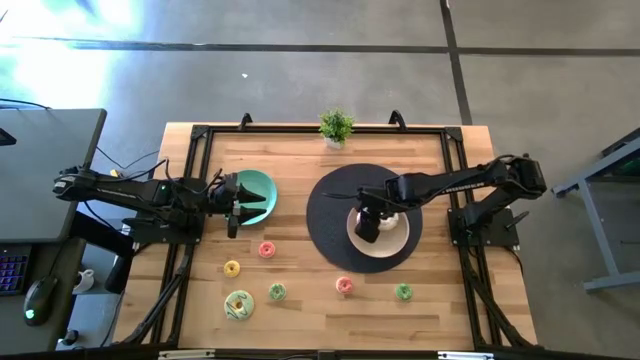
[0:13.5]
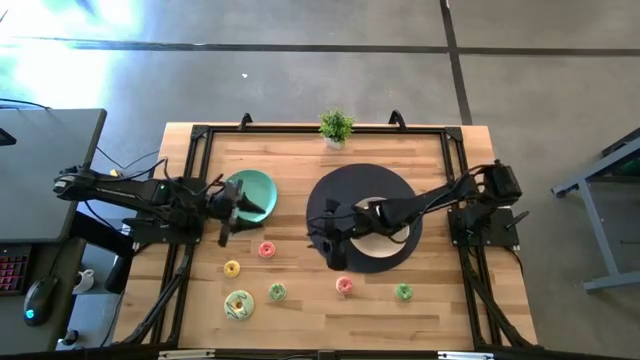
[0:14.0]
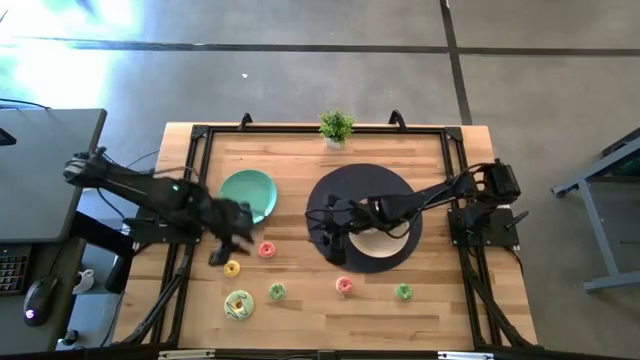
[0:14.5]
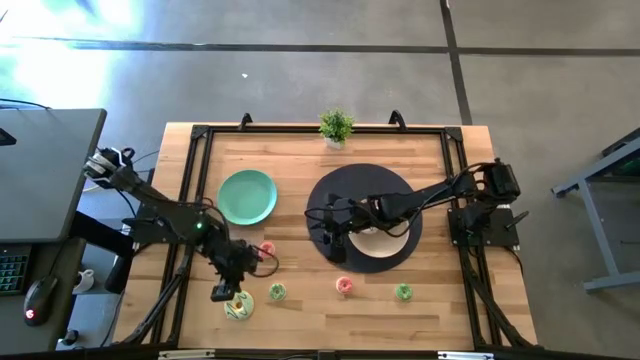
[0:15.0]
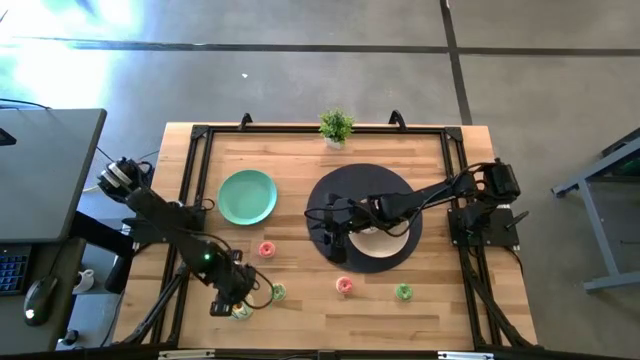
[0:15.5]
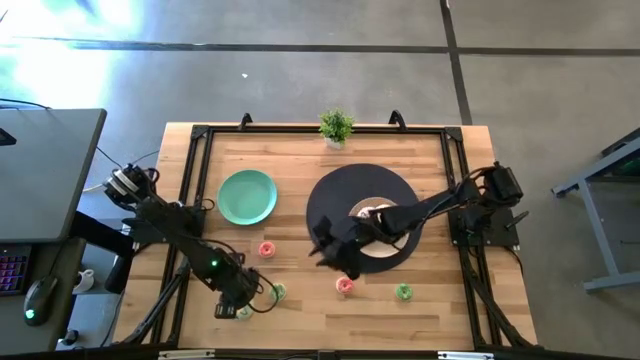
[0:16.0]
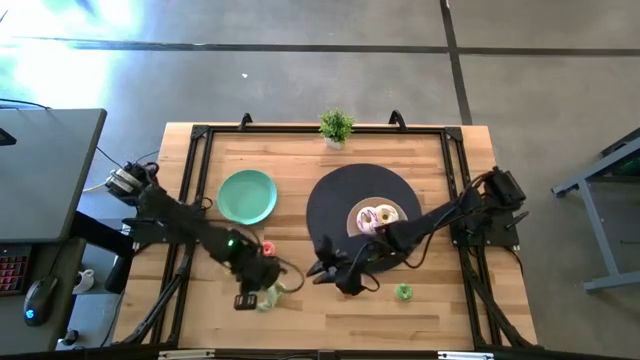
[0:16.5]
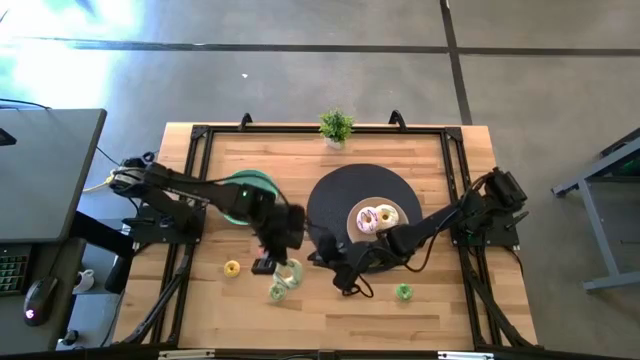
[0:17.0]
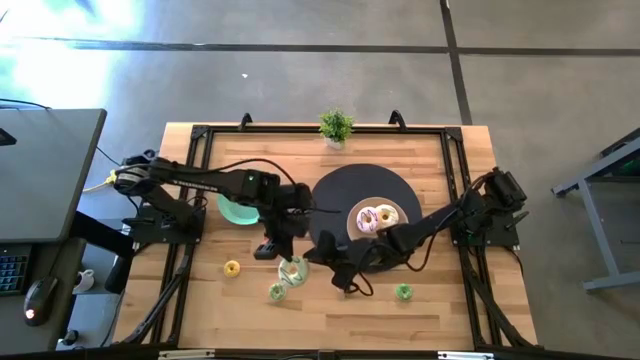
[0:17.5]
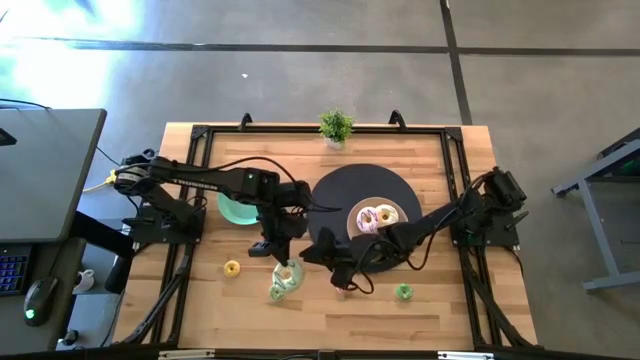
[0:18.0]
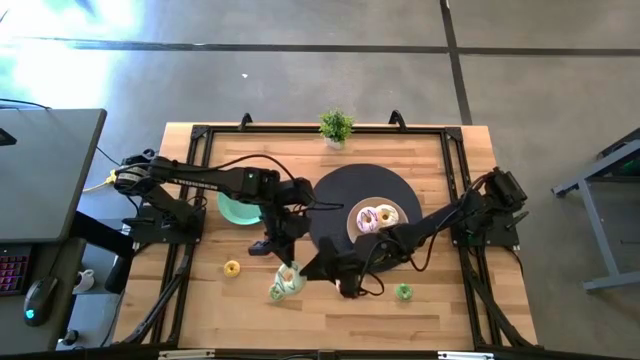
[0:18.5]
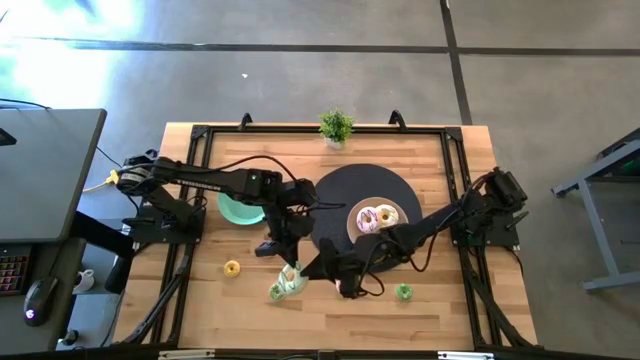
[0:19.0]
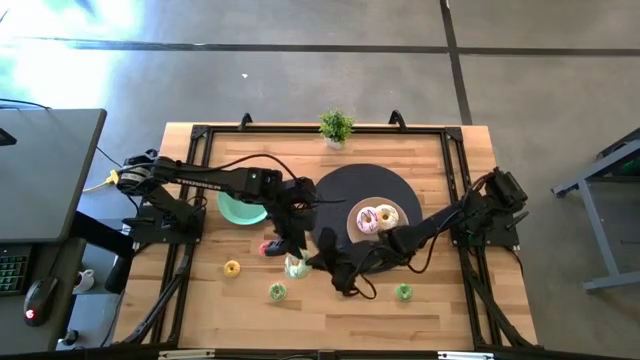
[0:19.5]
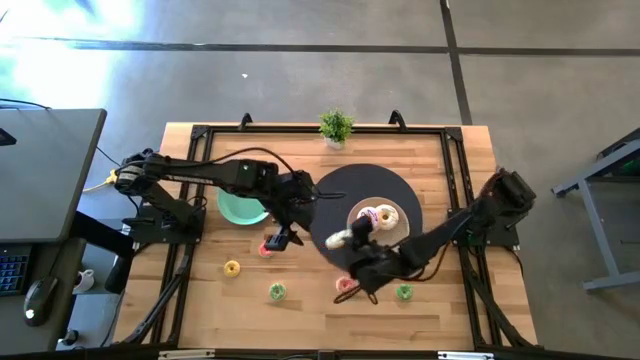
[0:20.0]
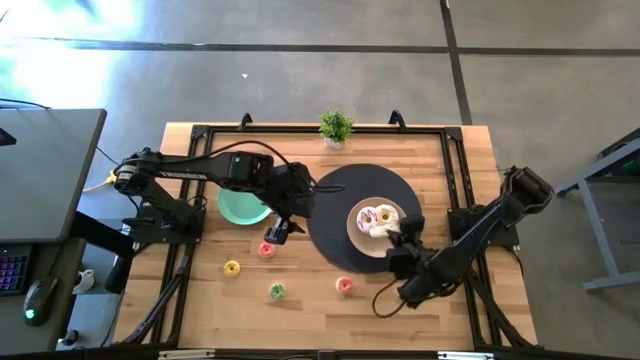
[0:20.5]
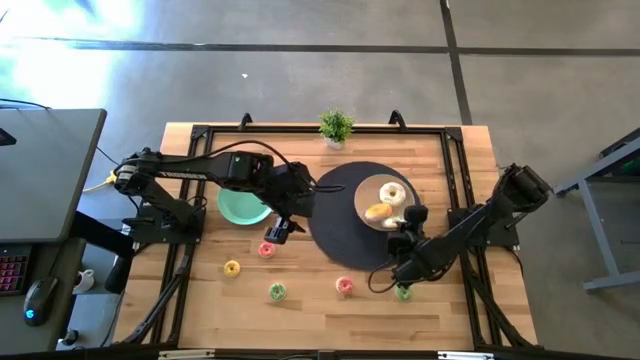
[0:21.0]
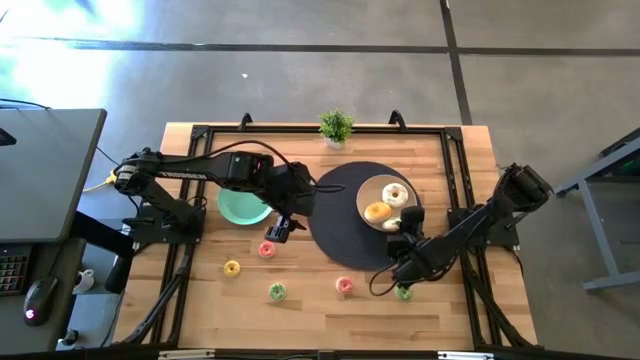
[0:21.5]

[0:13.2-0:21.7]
Task: Pick & Place donuts
Put the large green donut on the white plate

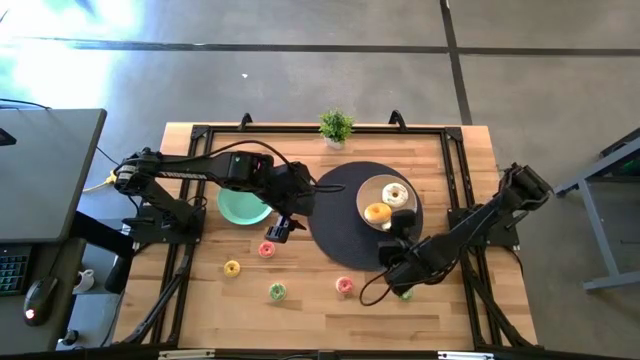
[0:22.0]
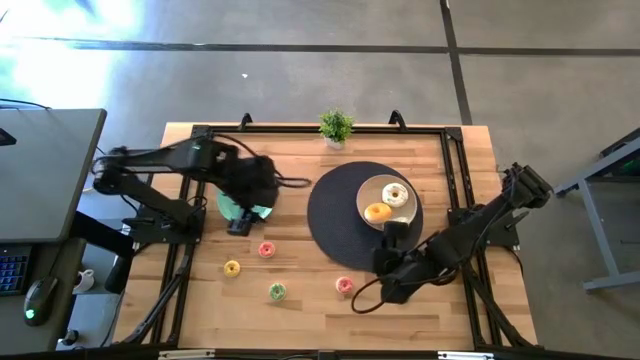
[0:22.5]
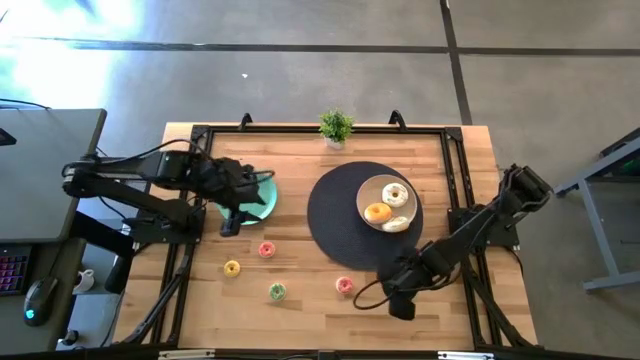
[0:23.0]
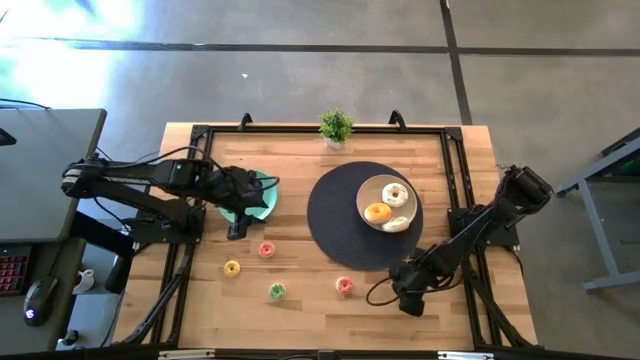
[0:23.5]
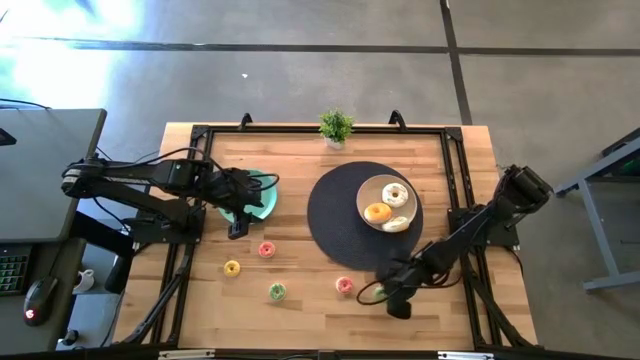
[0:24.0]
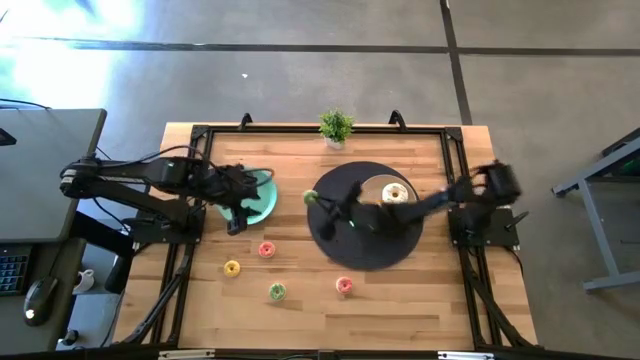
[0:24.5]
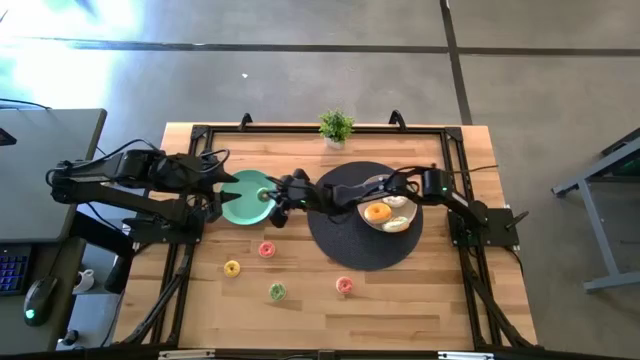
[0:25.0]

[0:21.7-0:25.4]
Put the right small green donut on the green plate

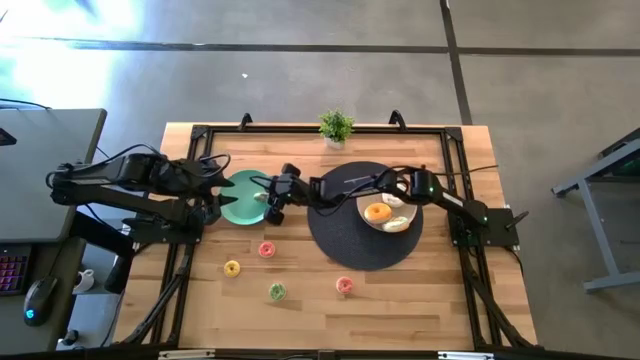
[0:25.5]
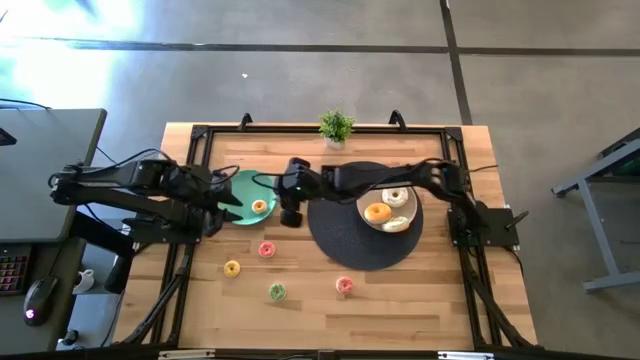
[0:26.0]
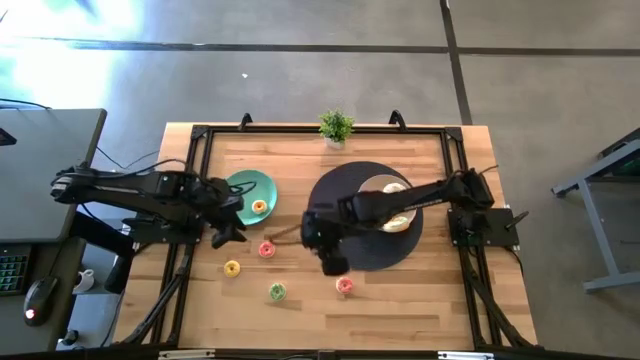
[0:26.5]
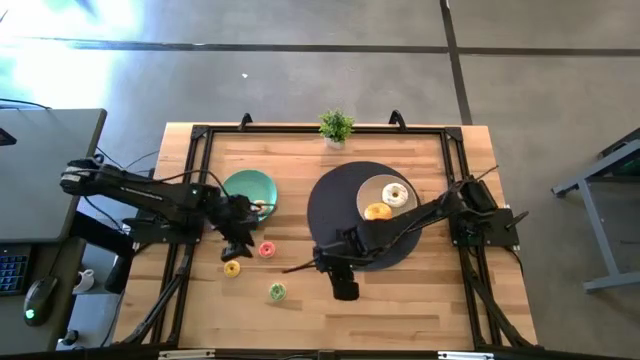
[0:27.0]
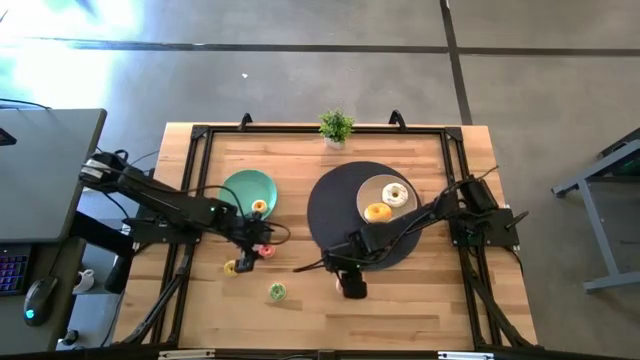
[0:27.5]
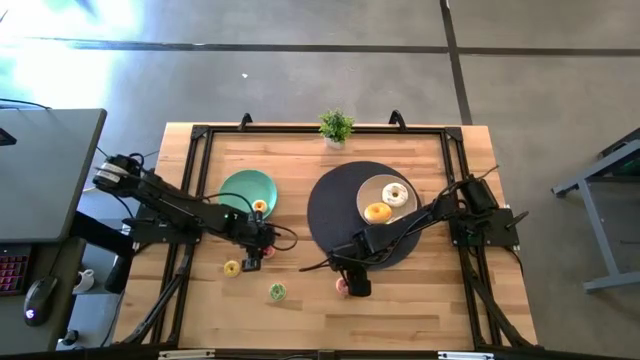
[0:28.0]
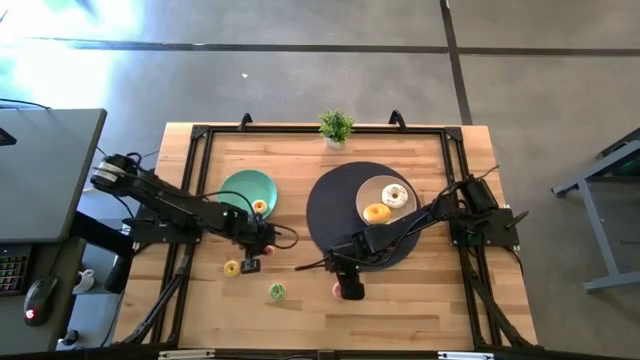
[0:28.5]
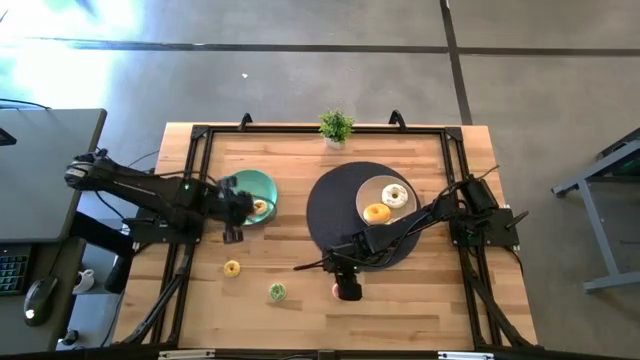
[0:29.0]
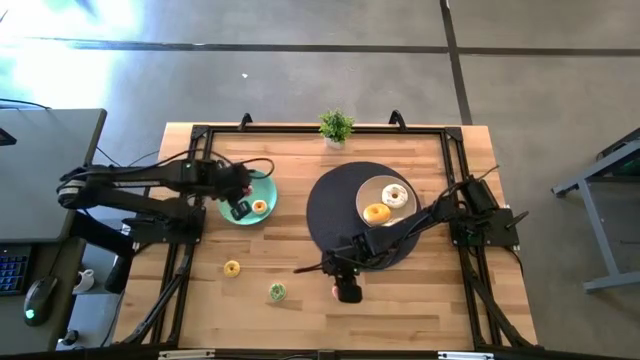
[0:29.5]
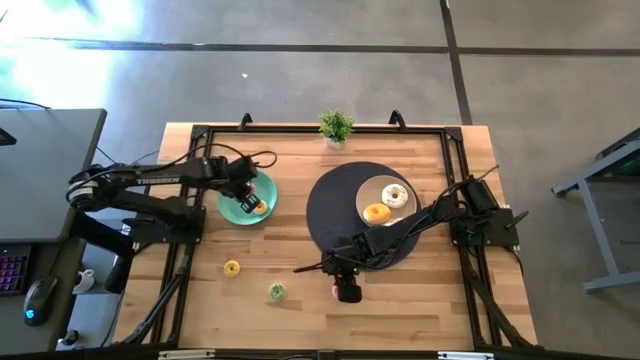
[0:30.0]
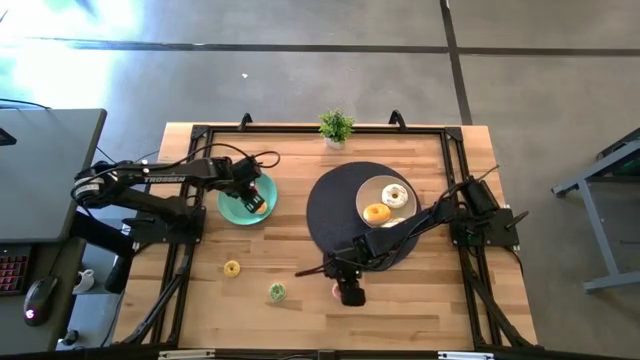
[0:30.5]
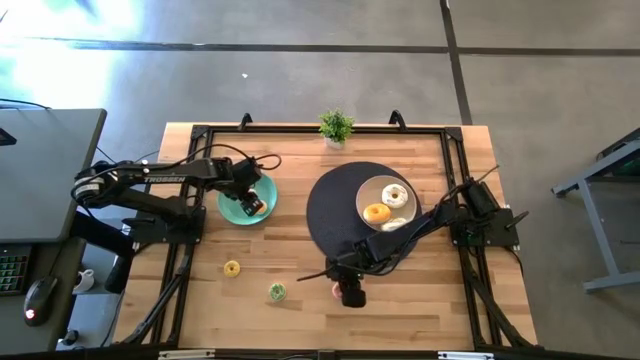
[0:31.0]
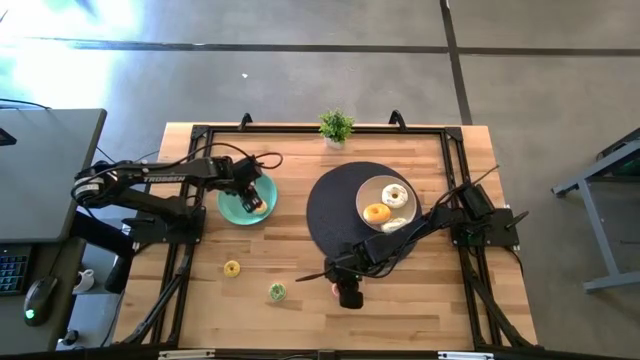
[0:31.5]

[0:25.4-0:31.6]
Put the top small pink donut on the green plate

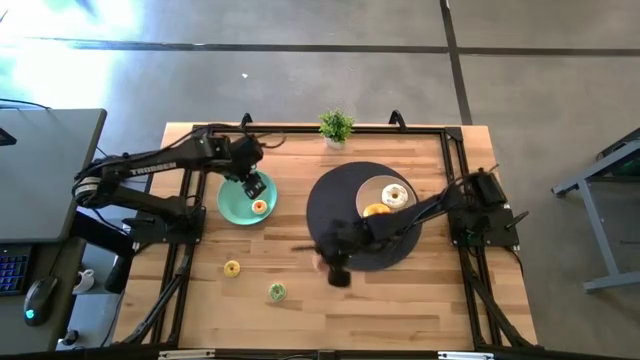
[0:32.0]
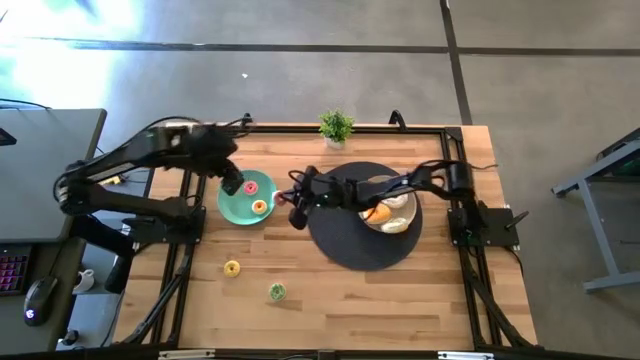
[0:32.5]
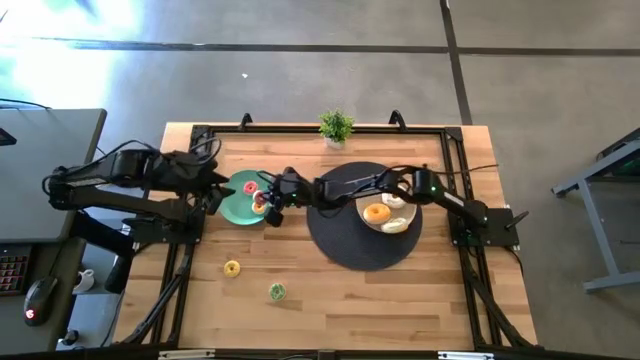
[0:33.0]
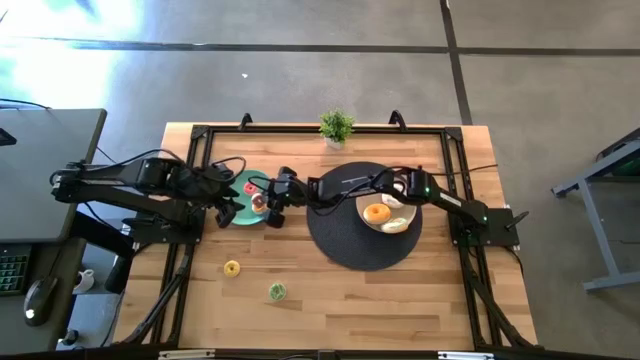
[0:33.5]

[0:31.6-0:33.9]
Put the small pink donut on the green plate

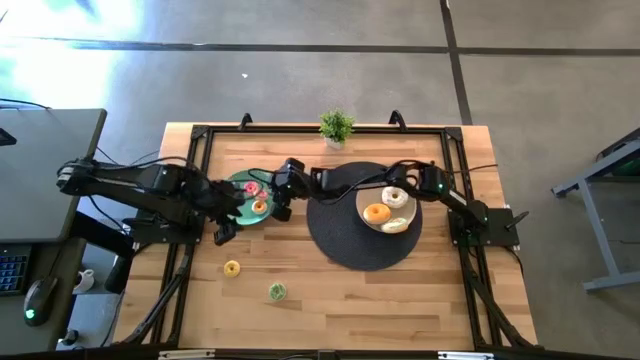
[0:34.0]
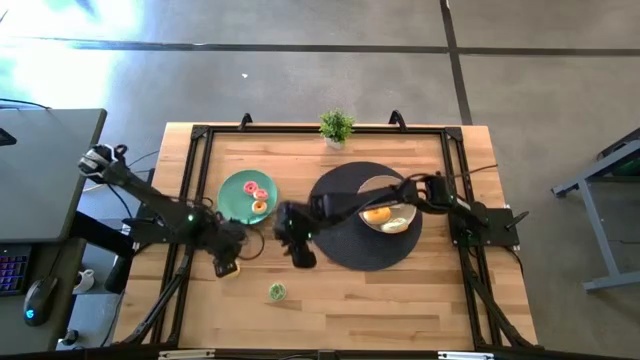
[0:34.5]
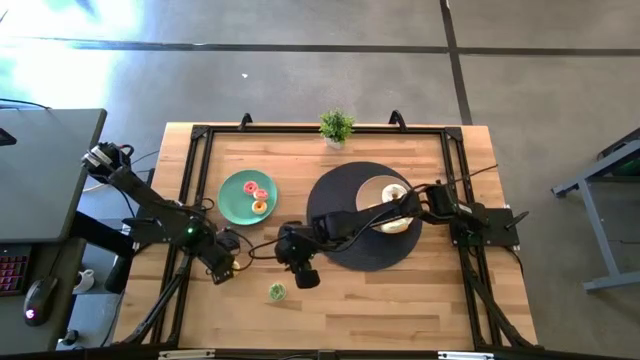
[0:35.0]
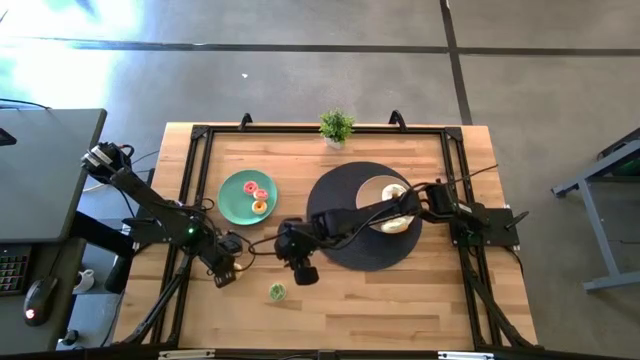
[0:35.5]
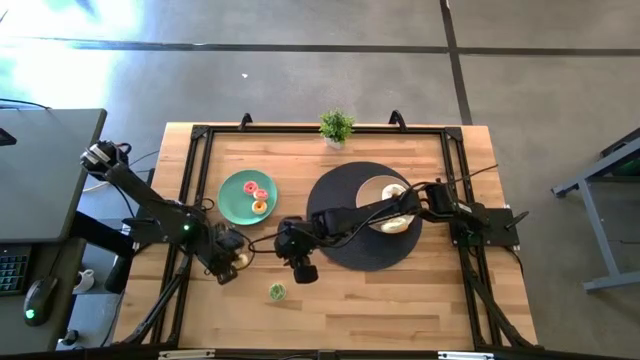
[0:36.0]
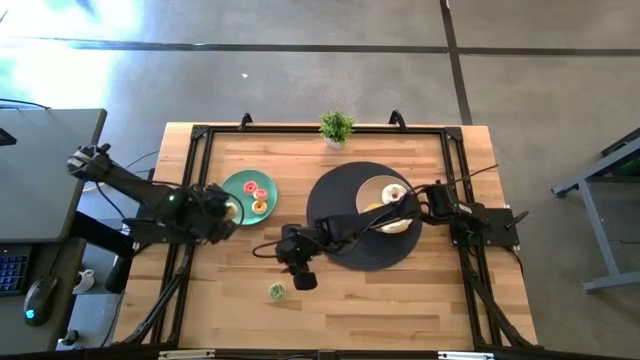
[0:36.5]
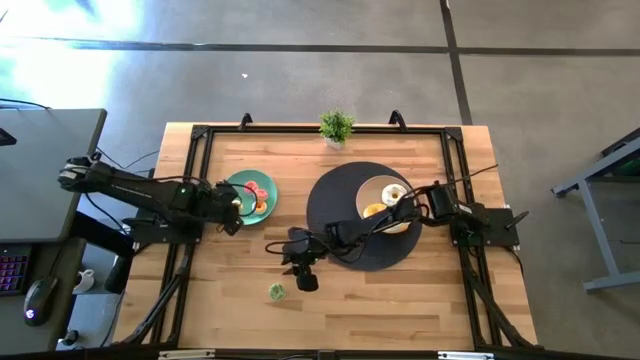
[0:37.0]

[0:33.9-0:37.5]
Put the small yellow donut on the green plate
